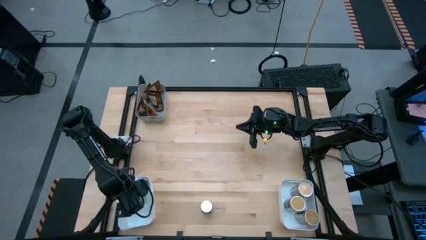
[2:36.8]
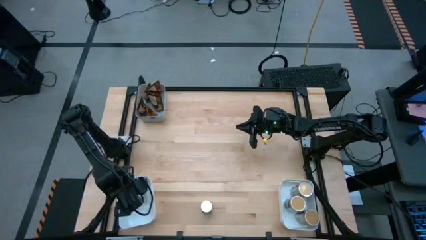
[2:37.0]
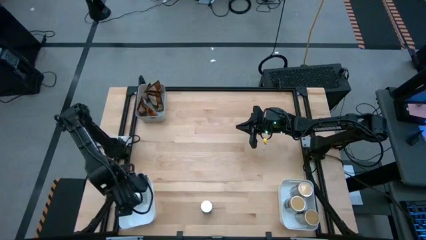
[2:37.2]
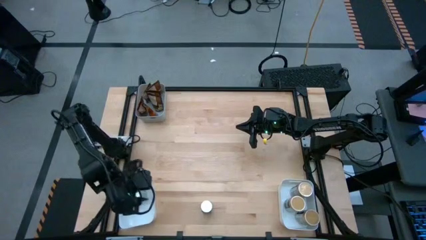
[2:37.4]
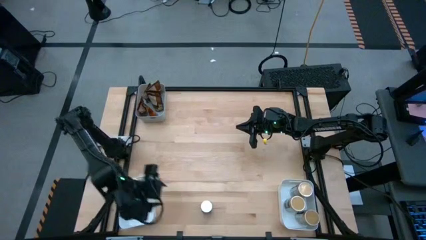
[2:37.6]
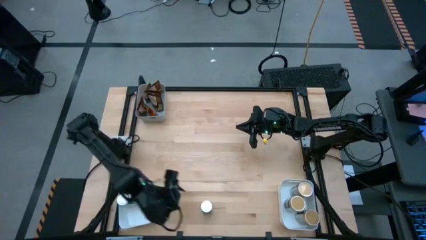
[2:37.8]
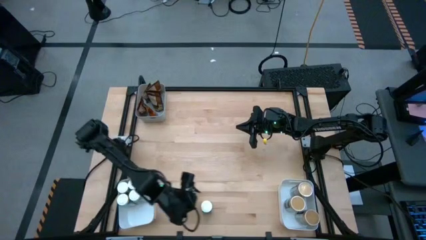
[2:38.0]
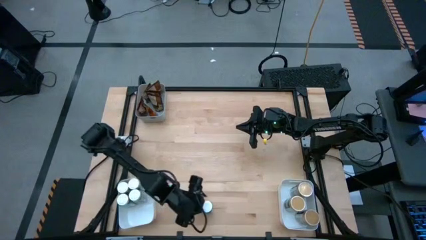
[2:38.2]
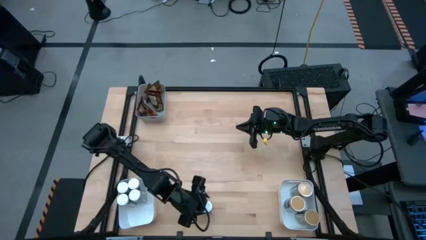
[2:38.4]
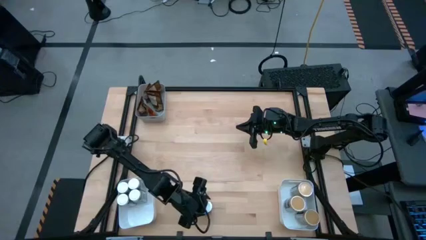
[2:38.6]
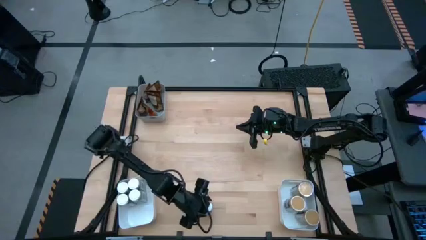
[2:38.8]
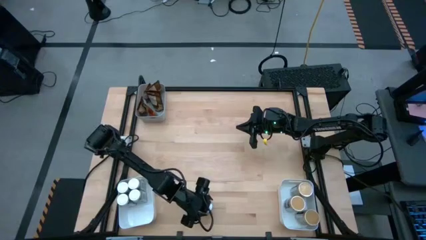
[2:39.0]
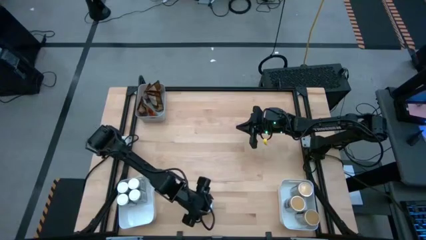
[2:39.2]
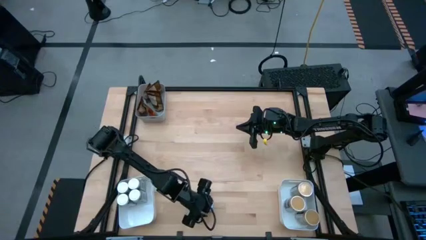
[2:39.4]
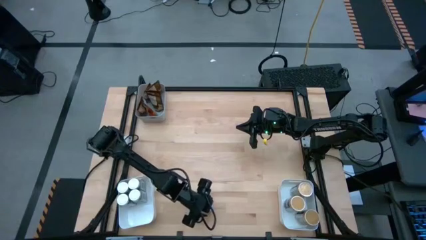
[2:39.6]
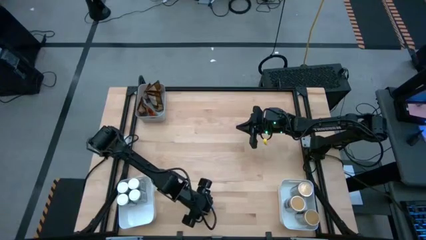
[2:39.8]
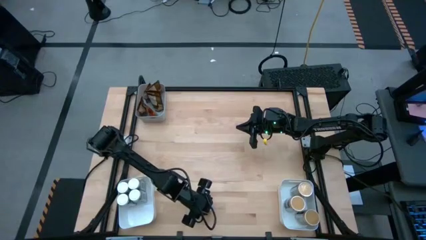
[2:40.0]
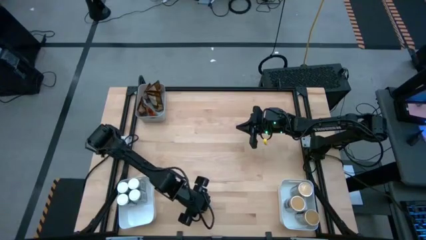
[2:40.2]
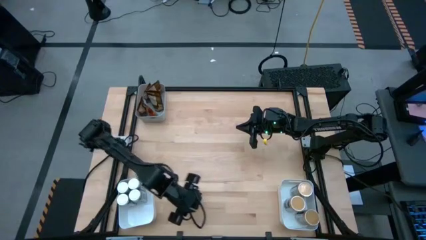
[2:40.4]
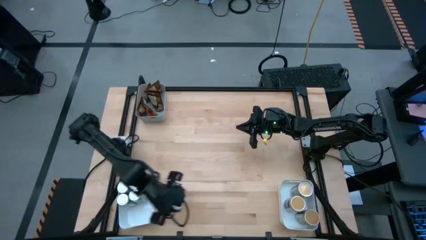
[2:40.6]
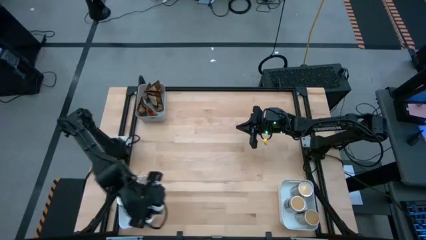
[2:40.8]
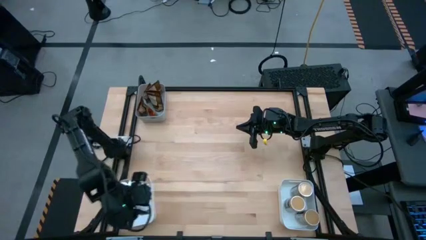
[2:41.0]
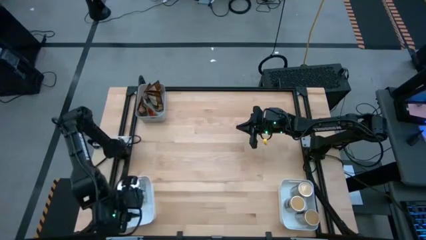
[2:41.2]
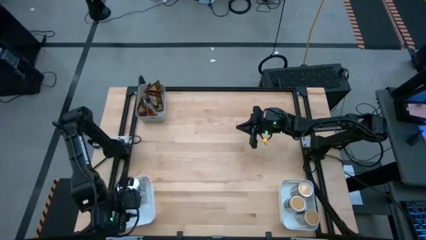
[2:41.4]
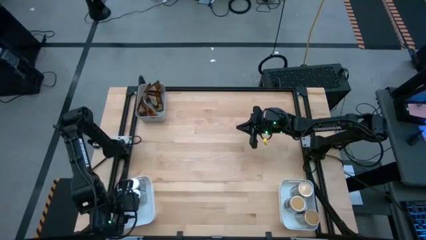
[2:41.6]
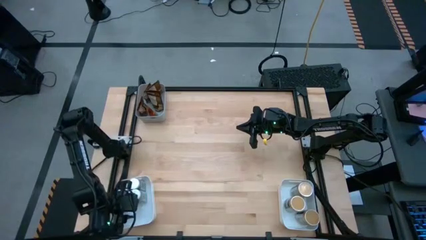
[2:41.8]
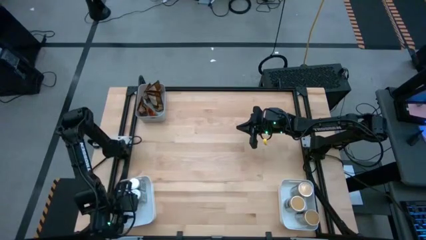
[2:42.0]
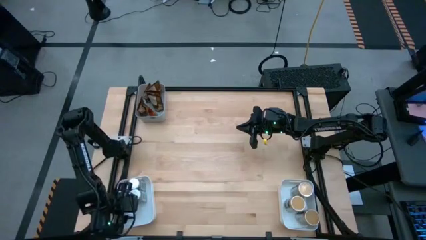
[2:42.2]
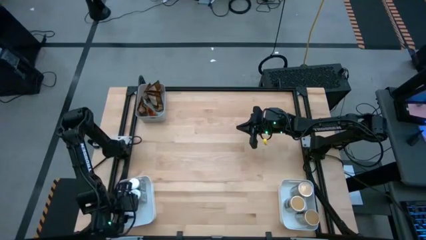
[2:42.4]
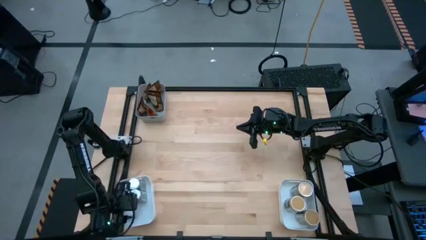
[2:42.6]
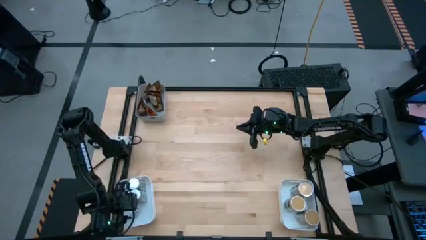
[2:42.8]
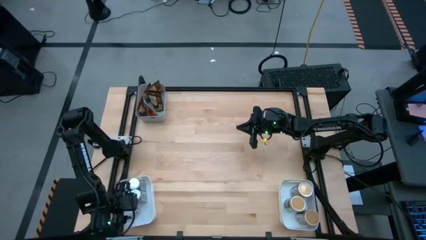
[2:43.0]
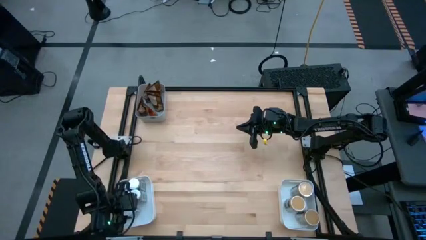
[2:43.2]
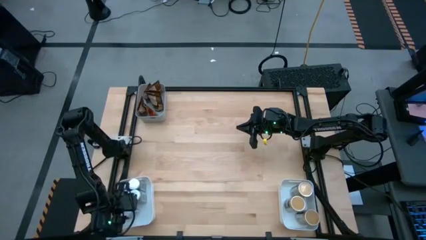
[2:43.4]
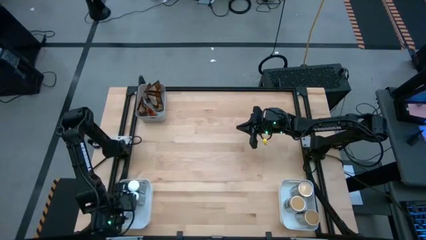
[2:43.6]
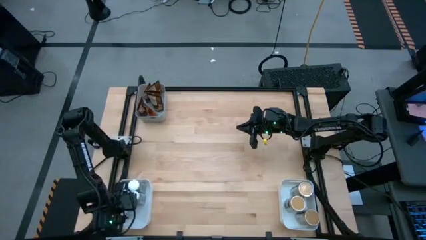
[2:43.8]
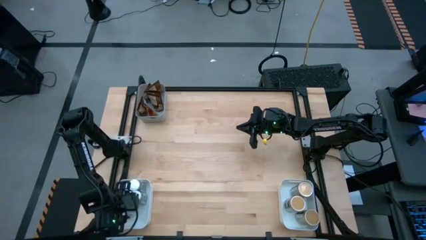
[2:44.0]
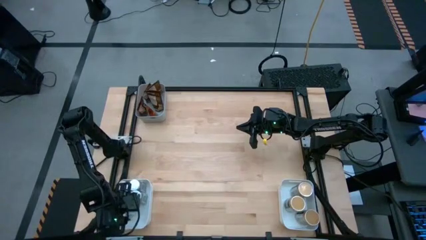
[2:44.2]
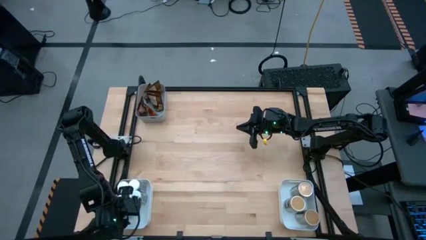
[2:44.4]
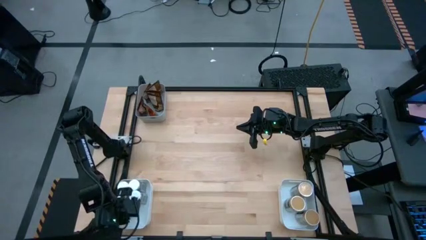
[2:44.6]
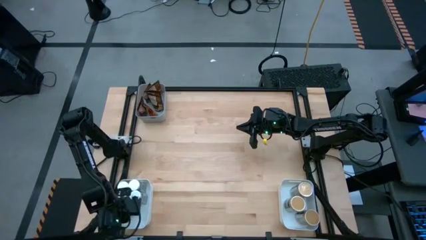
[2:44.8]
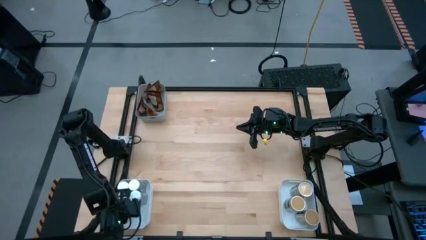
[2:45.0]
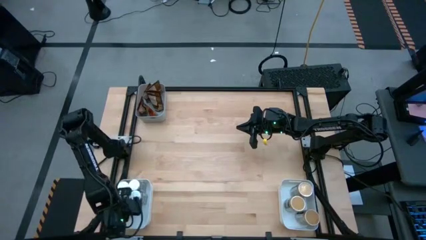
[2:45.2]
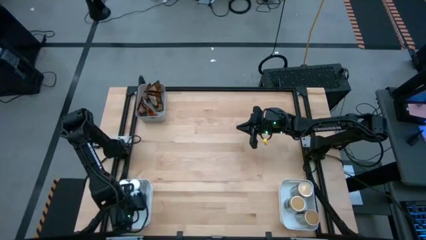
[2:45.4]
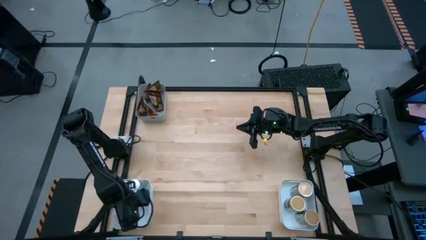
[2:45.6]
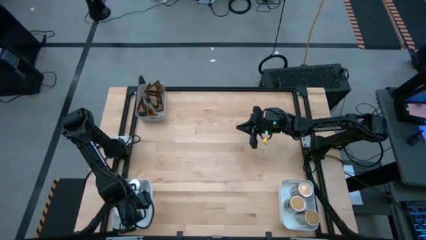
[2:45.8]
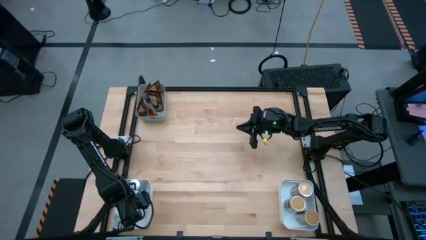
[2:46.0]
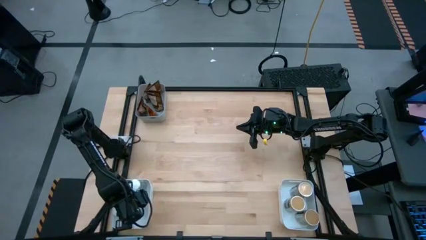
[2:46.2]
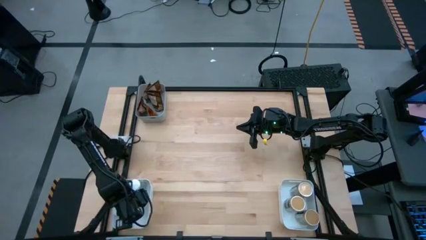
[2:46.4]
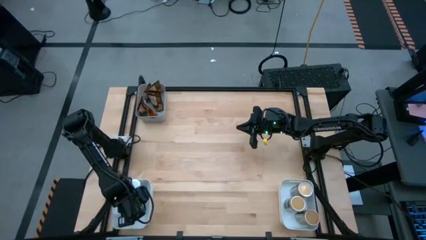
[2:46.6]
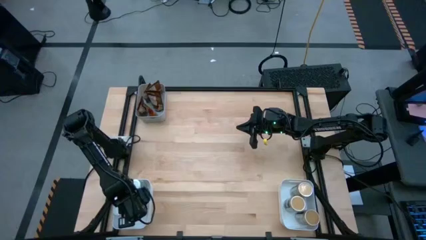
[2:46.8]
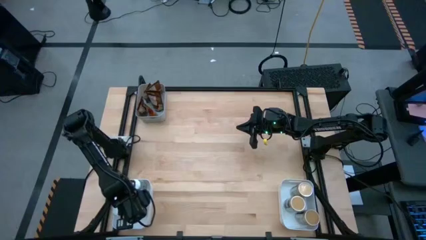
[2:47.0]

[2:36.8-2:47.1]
Task: Sort spices by type
Put the white seasoning bottle into the bottom left white bin

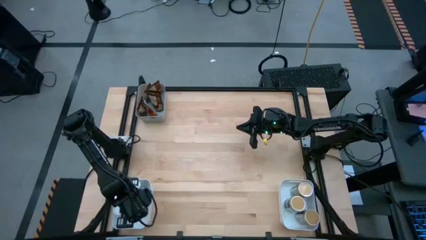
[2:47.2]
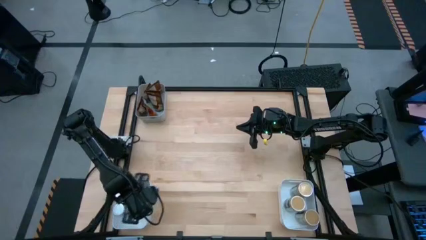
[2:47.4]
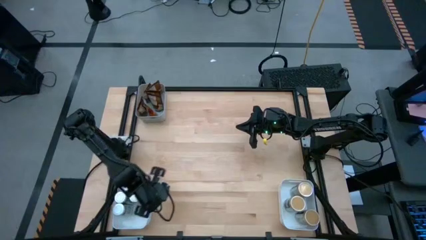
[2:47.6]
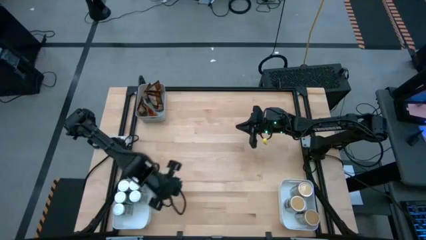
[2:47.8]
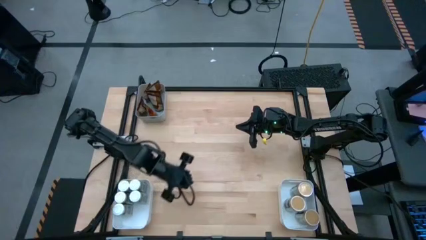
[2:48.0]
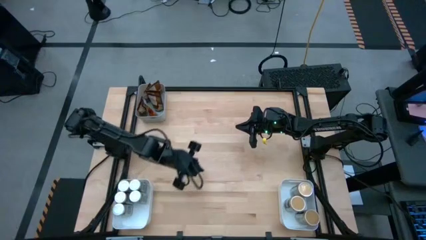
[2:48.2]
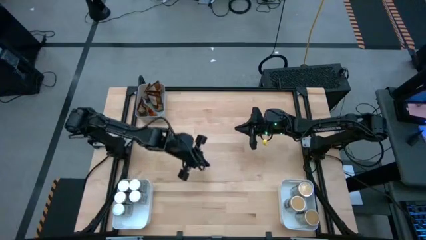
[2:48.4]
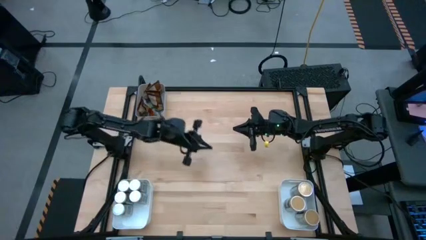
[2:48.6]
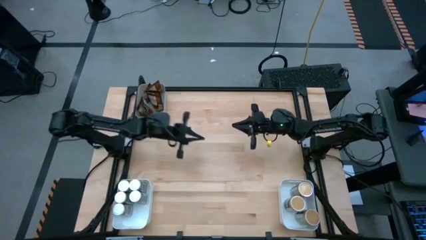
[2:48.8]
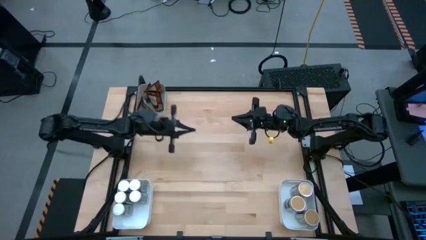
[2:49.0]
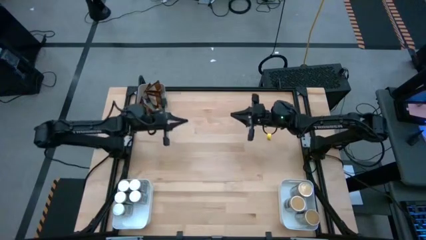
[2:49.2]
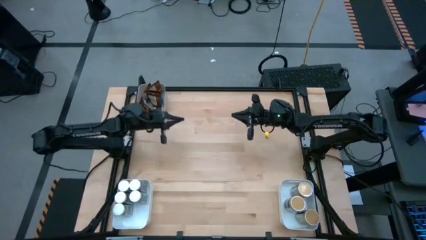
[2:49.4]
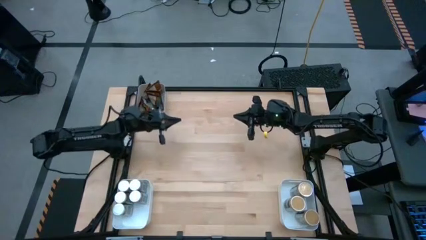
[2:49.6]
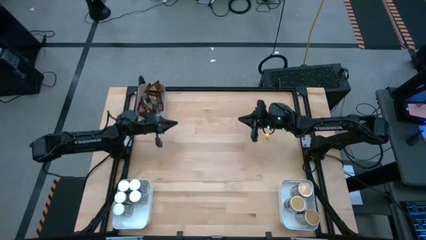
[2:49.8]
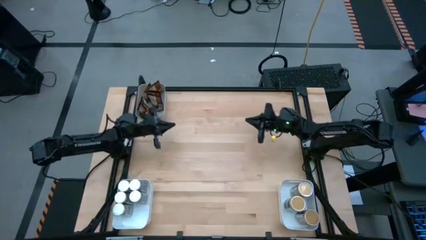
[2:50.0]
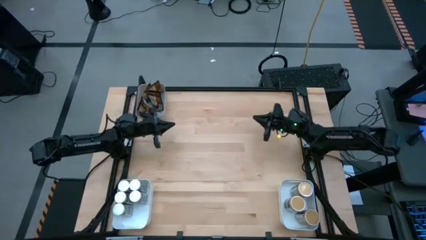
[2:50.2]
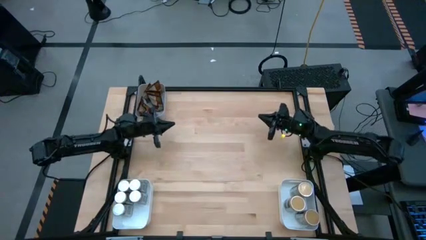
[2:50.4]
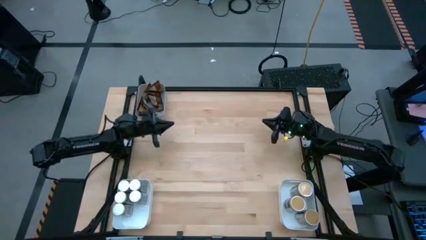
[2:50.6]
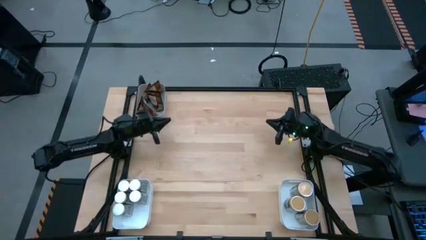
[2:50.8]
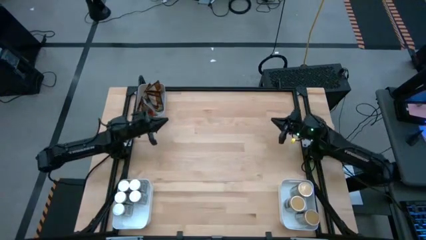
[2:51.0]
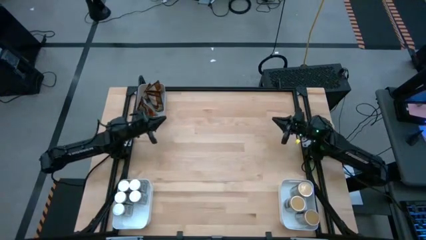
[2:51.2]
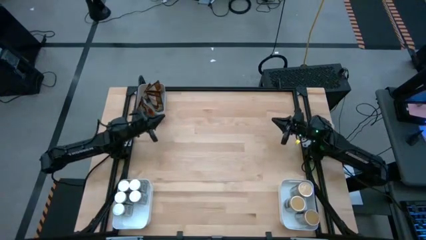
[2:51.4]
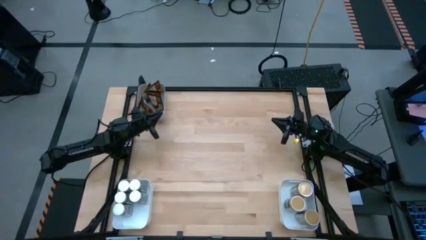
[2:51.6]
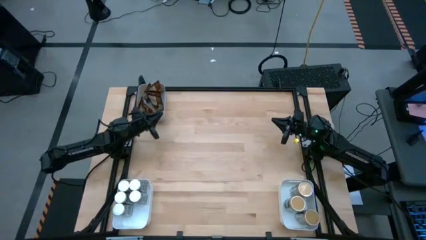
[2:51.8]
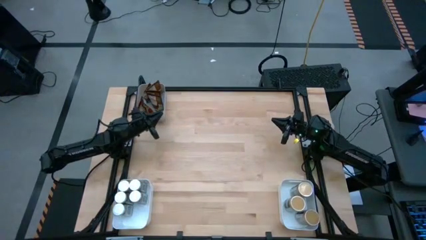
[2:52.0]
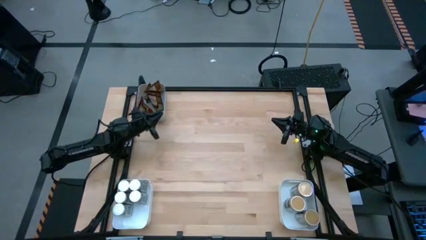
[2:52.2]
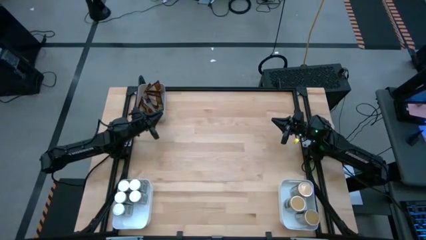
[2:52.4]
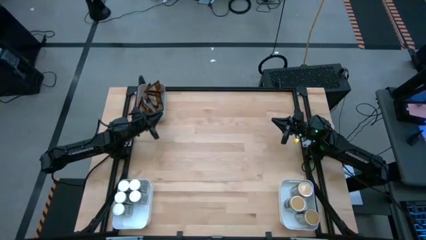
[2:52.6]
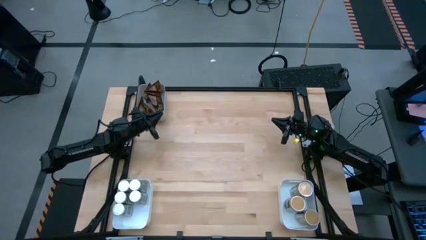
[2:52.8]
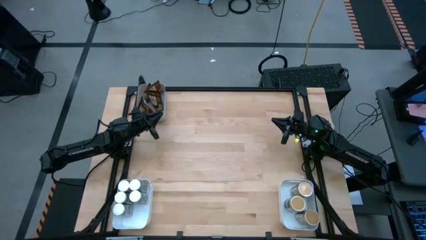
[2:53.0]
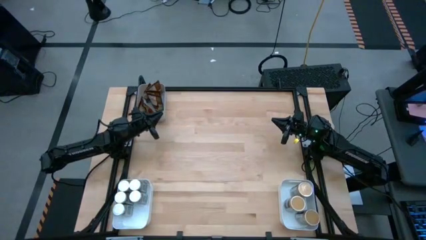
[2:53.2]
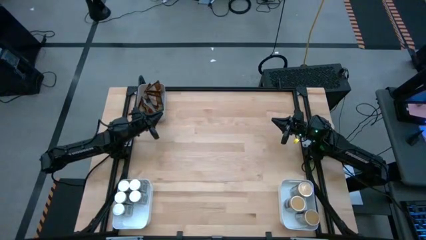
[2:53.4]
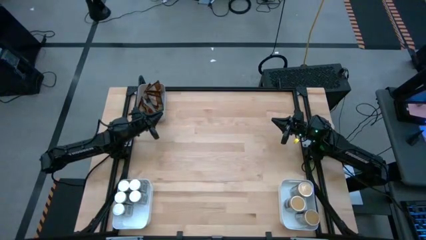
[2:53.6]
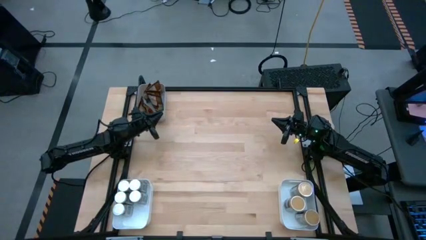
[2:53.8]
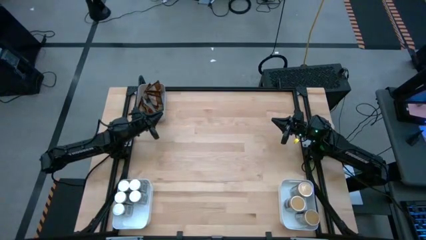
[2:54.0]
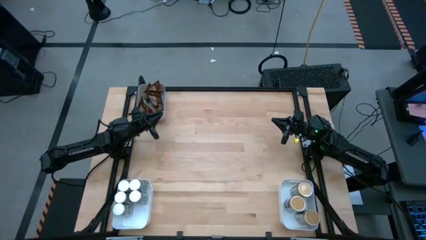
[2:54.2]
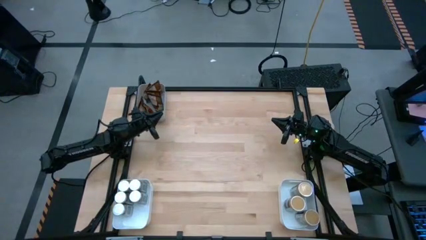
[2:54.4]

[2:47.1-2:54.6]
Return to Home Position
